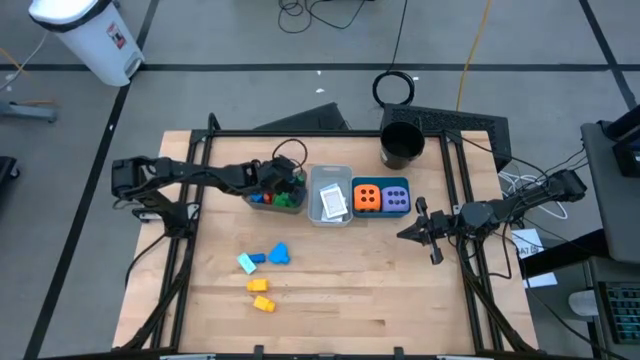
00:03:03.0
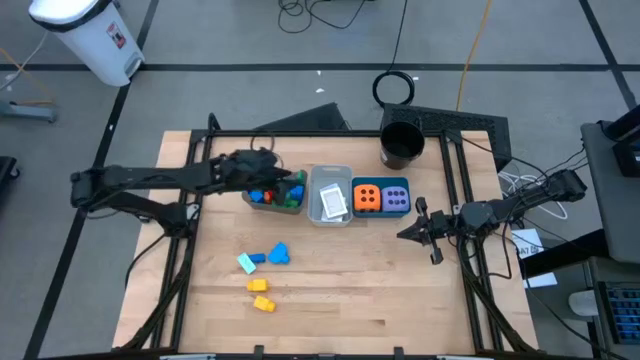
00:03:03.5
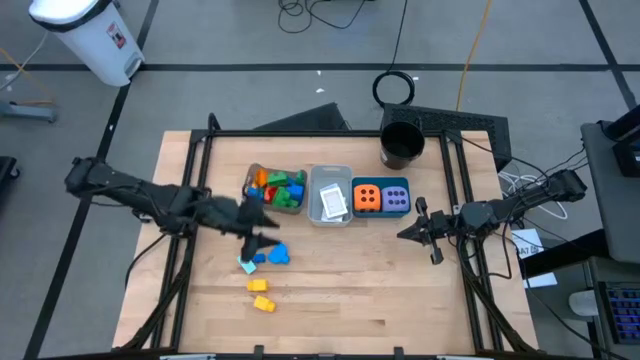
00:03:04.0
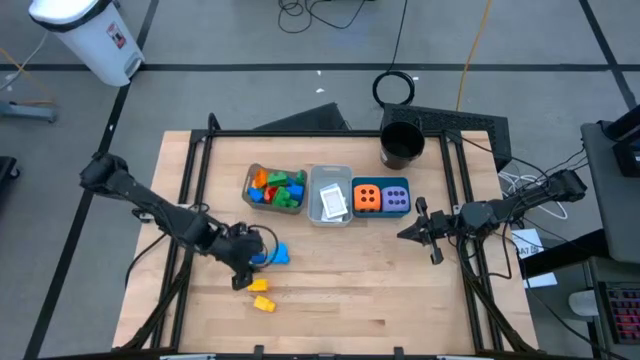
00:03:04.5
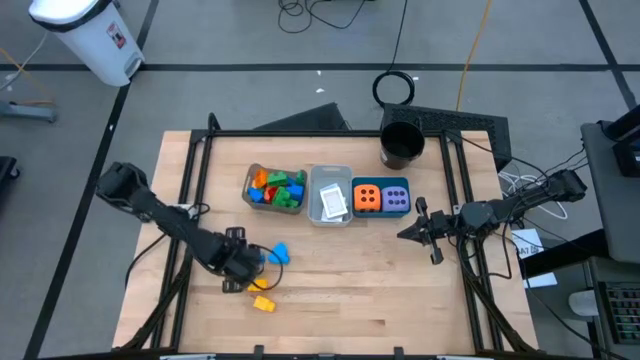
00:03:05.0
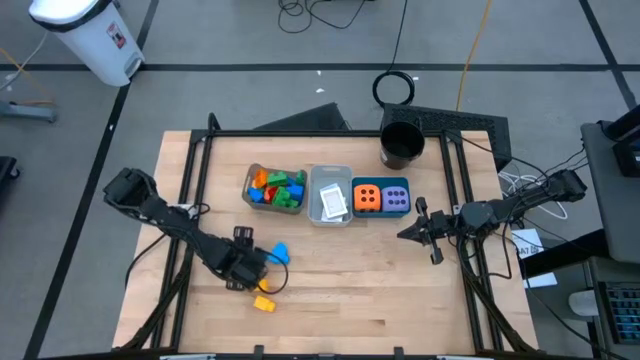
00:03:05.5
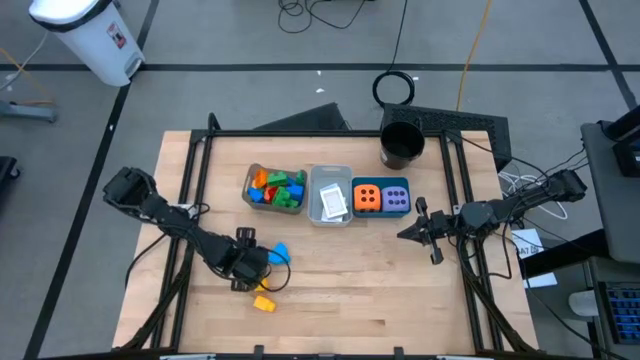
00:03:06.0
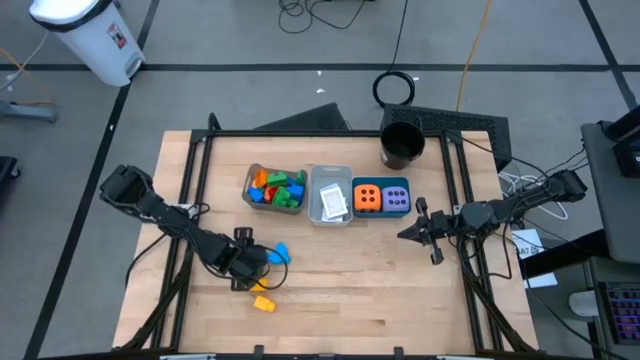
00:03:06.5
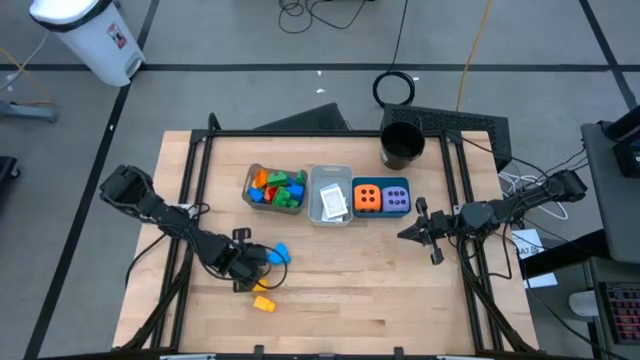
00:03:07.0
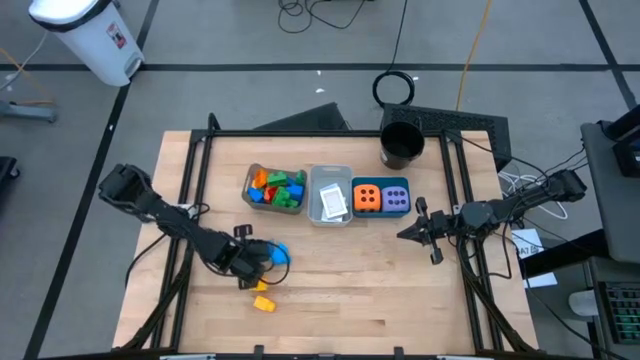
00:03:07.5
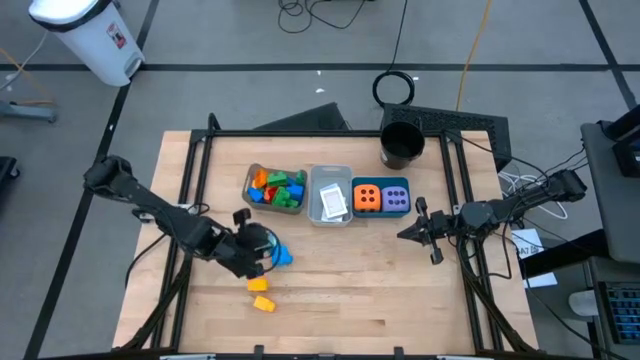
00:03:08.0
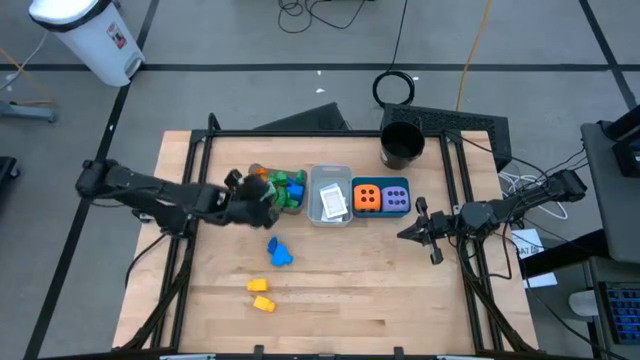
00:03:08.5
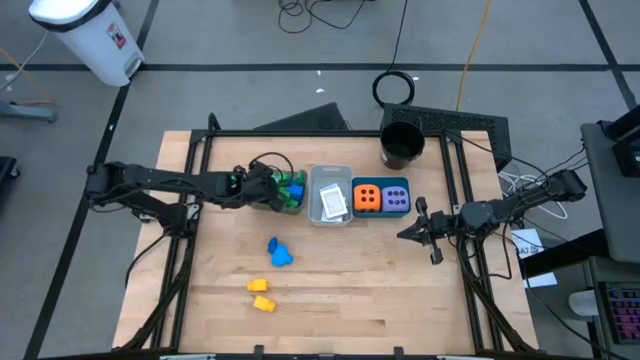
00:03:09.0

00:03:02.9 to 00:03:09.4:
Task: Pick & Place Toys
Put the light blue game piece into the black bin

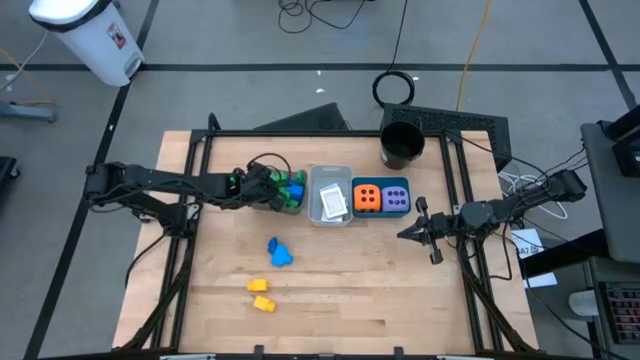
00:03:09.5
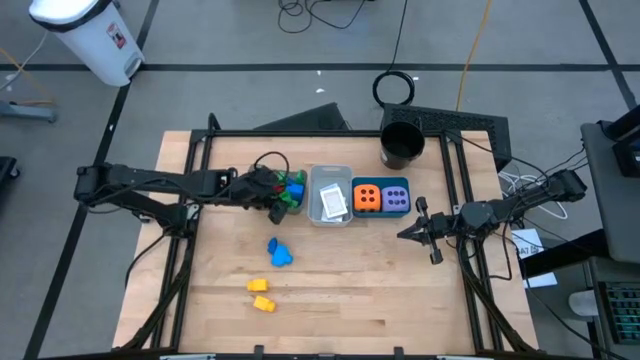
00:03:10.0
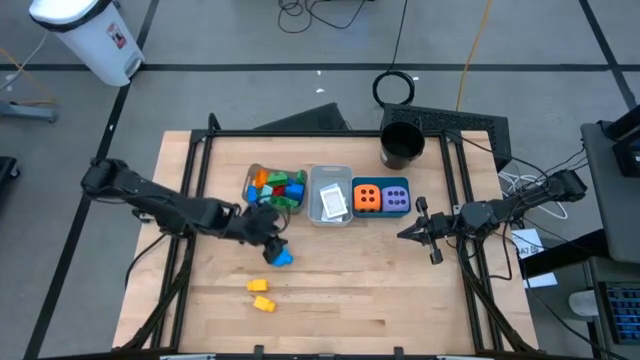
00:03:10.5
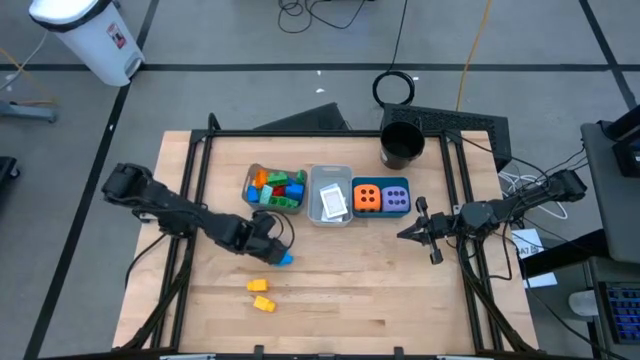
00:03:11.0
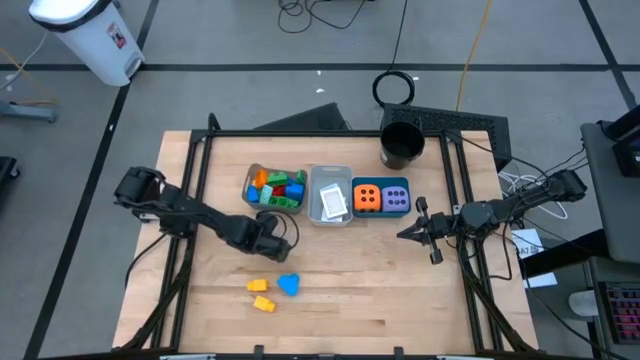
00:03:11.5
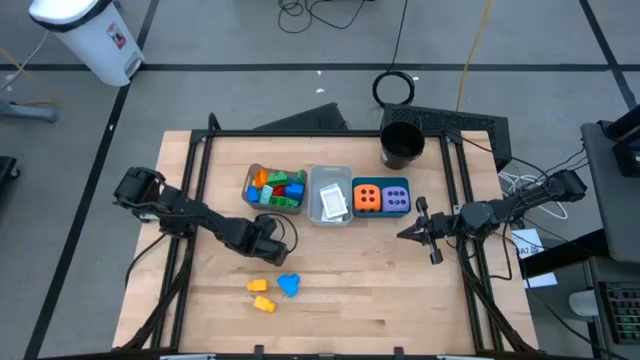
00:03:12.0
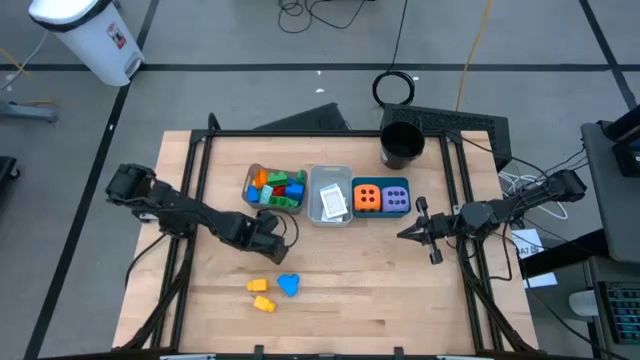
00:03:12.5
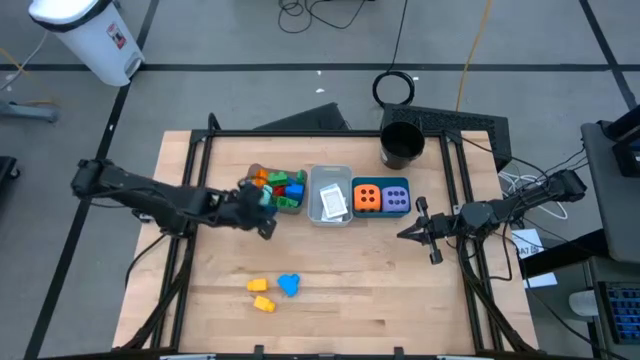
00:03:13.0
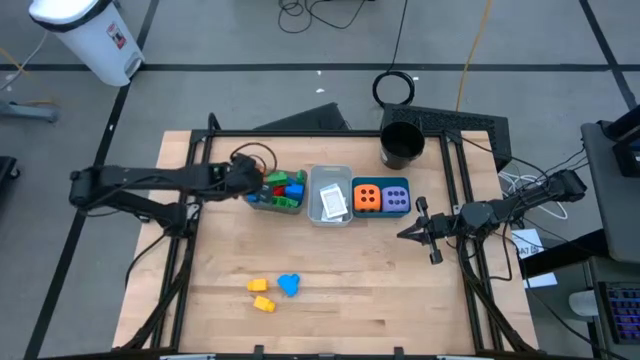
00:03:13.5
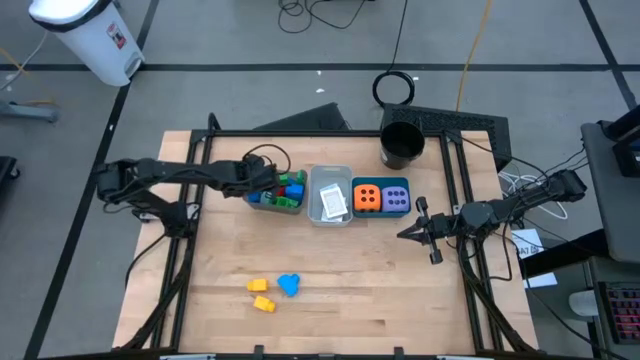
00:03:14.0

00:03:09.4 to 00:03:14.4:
Put the blue game piece into the black bin

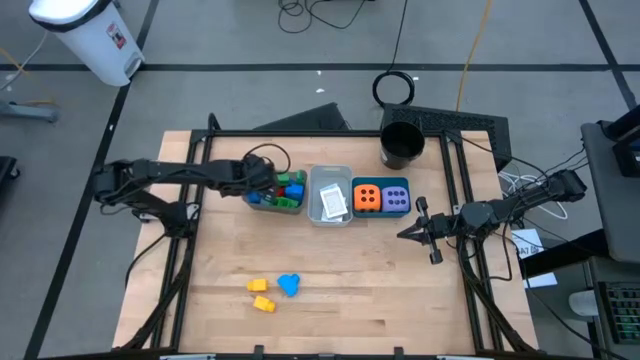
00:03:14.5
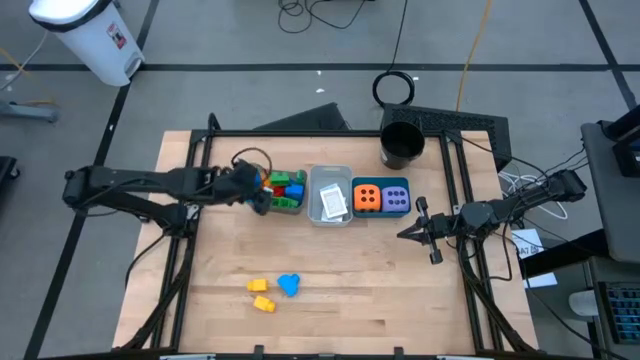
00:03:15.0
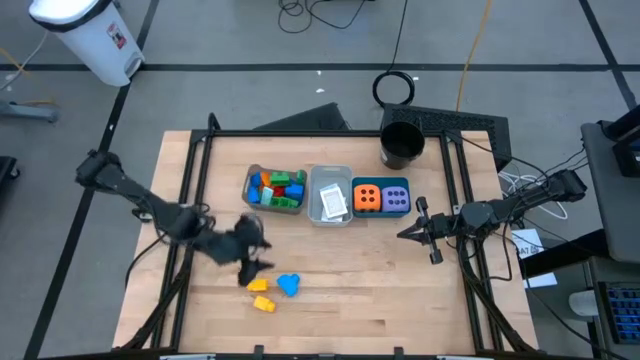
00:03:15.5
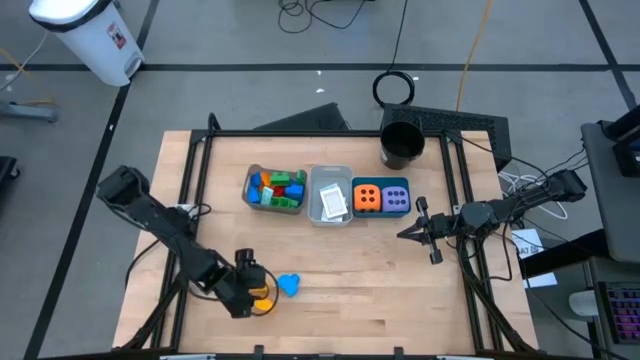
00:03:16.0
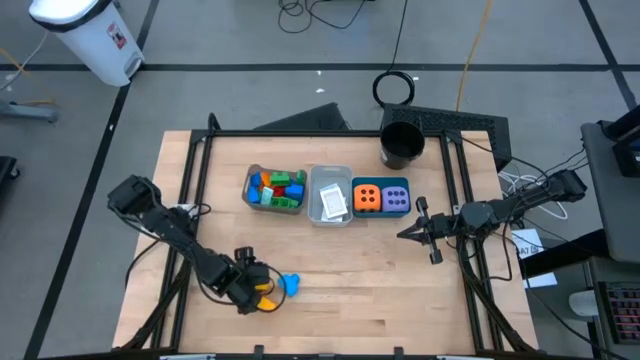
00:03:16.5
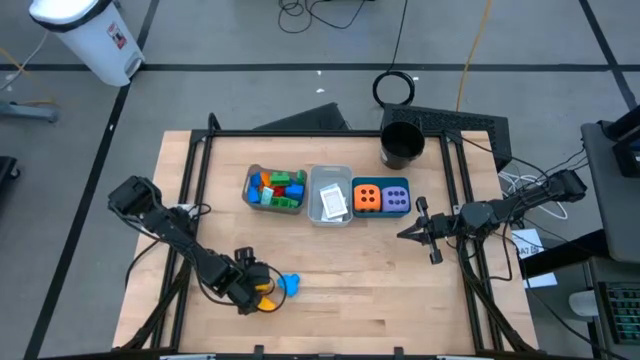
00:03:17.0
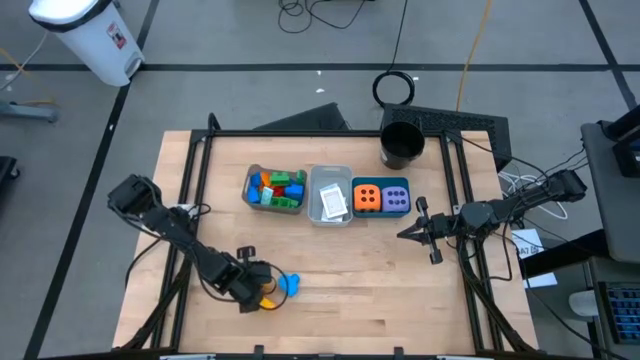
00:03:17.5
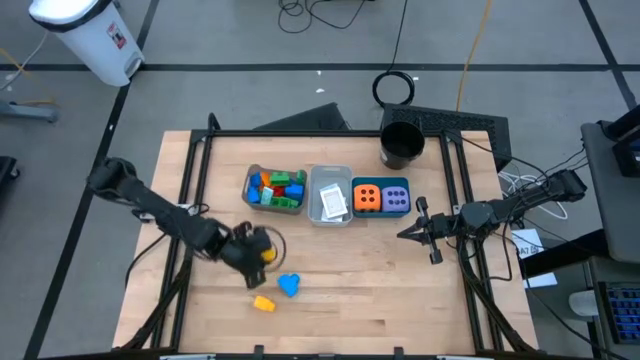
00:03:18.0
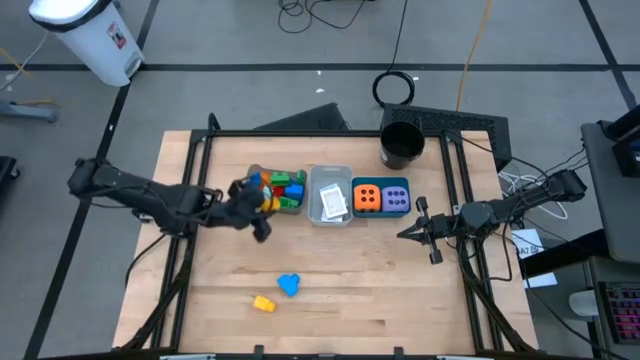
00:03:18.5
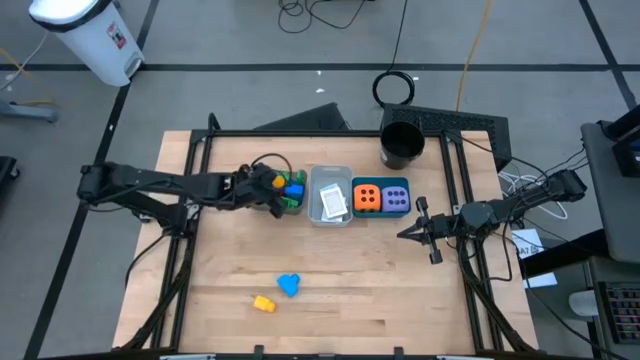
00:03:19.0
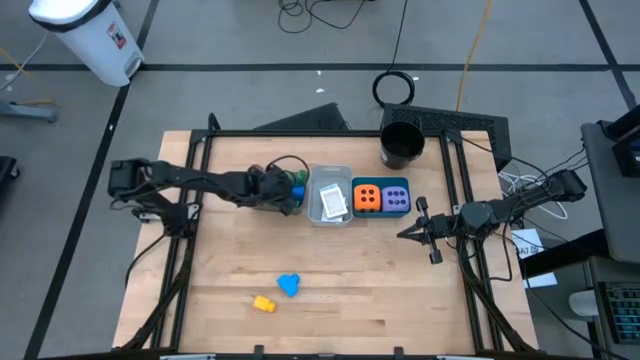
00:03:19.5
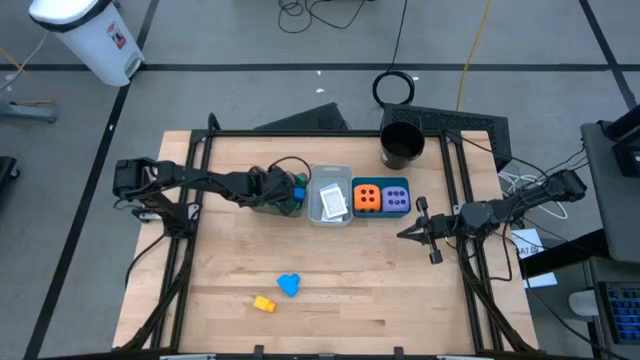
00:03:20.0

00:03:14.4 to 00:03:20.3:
Put the yellow game piece into the black bin

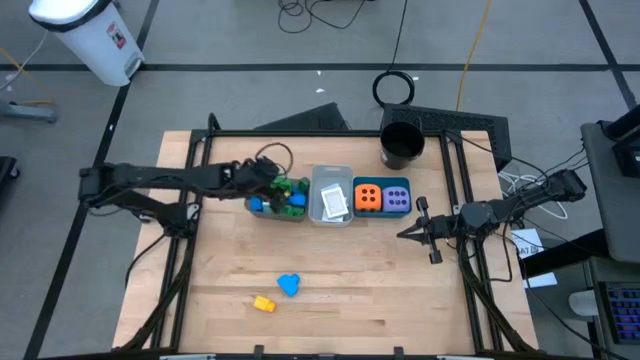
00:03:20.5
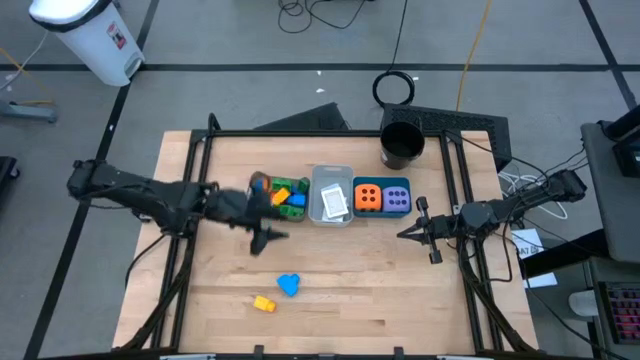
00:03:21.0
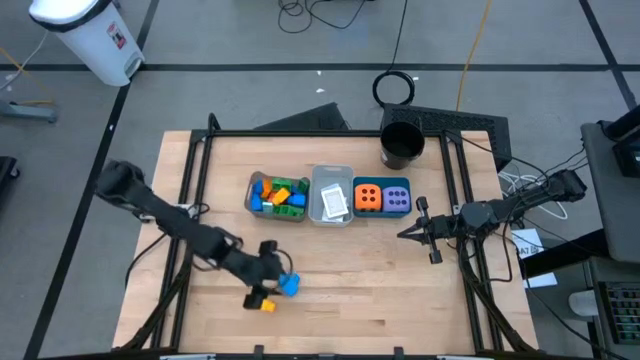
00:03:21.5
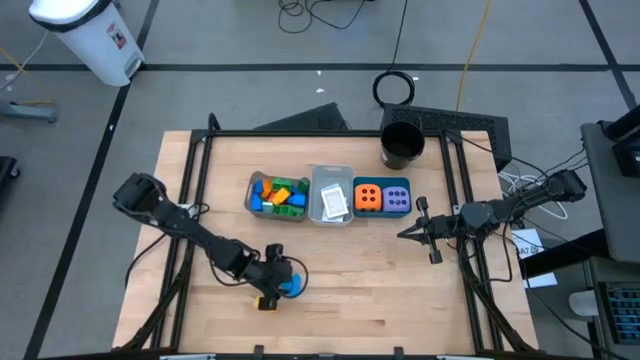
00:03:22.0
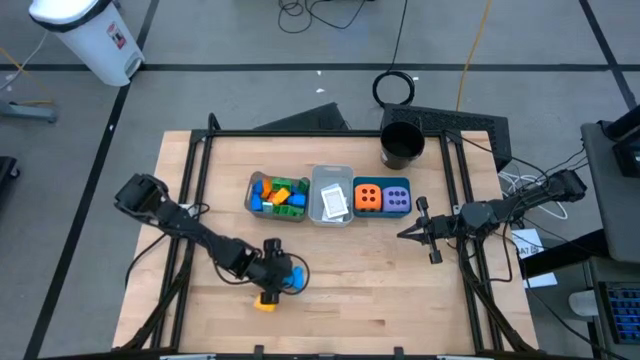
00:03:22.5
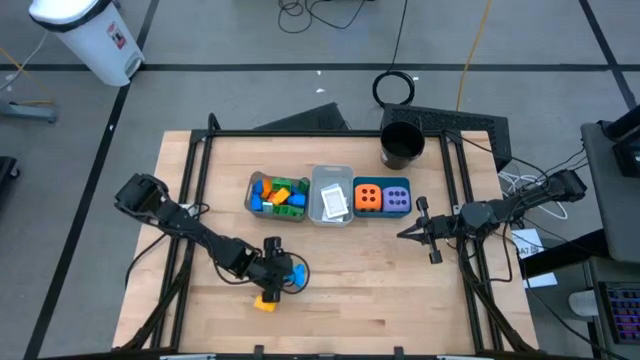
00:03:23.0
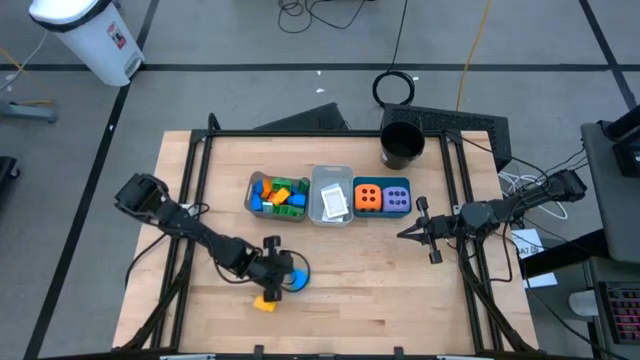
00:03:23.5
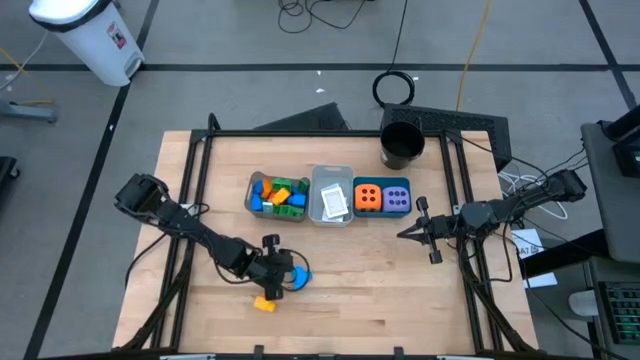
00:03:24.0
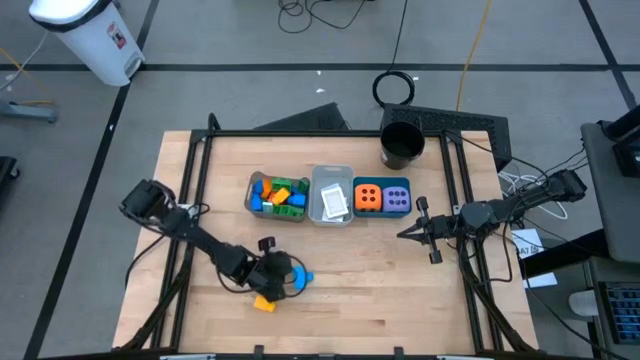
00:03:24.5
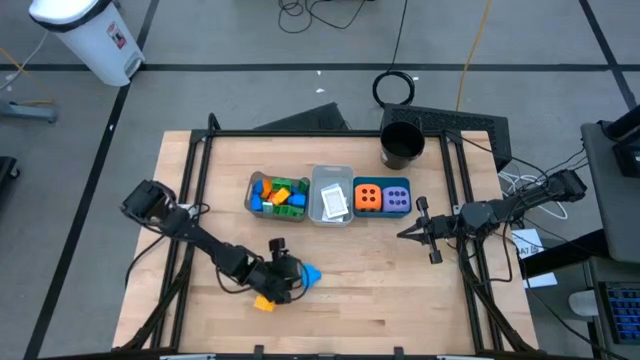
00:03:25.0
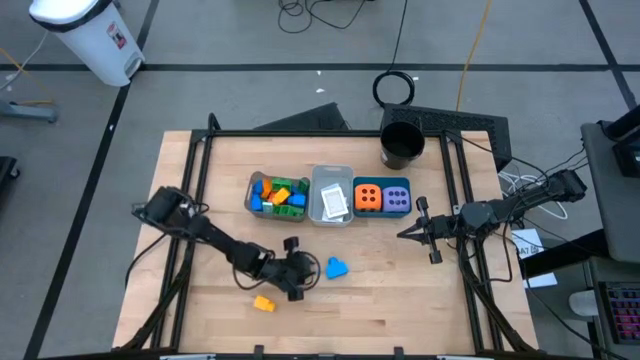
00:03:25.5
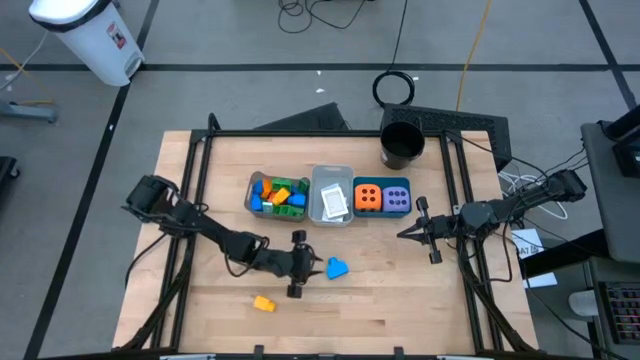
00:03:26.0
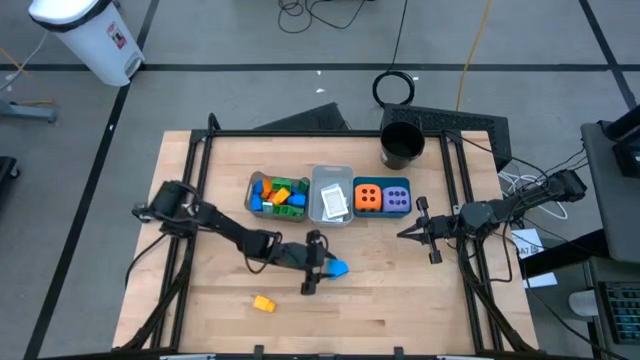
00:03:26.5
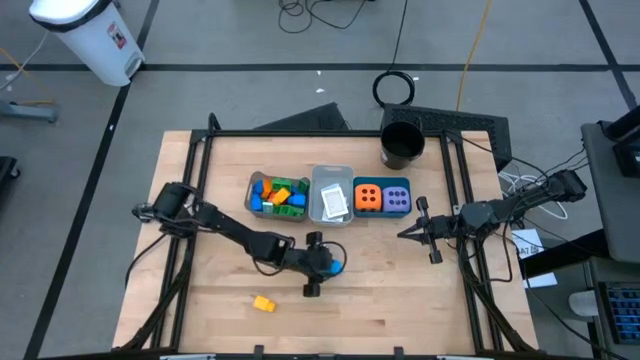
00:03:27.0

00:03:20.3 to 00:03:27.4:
Put the blue game piece into the black bin
